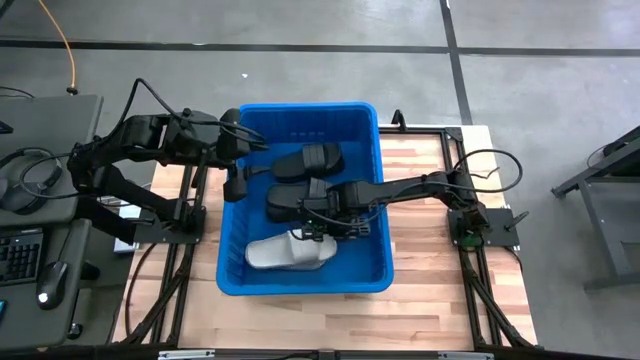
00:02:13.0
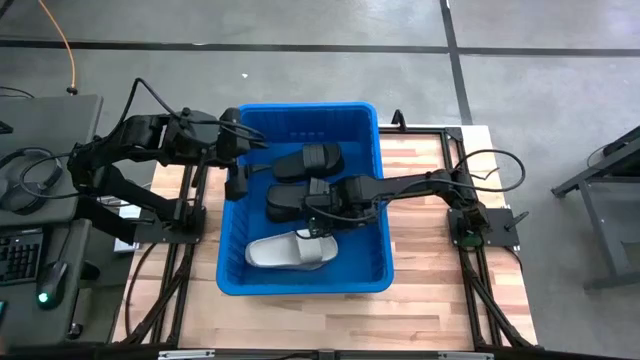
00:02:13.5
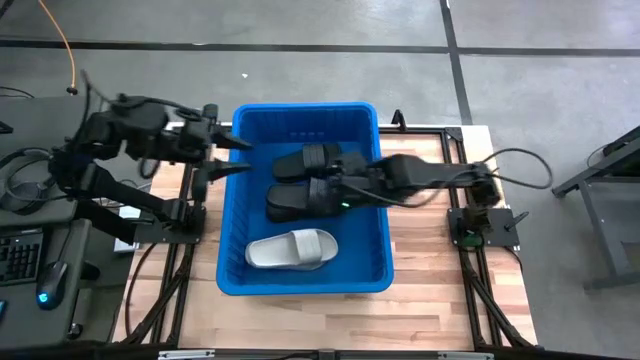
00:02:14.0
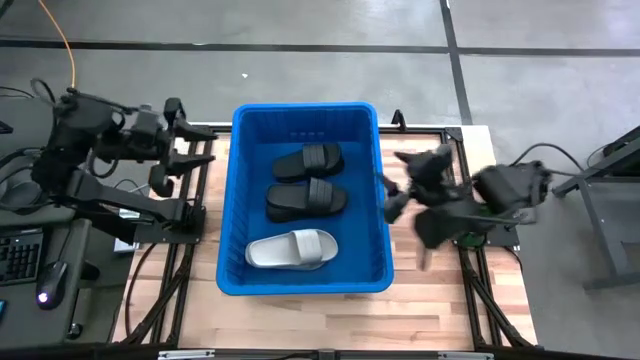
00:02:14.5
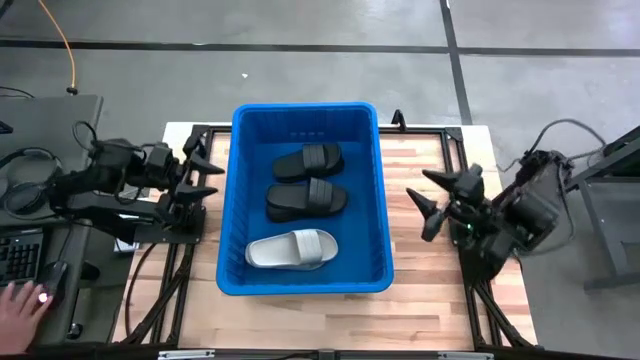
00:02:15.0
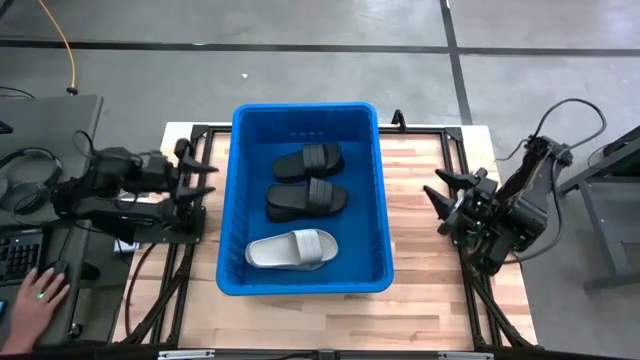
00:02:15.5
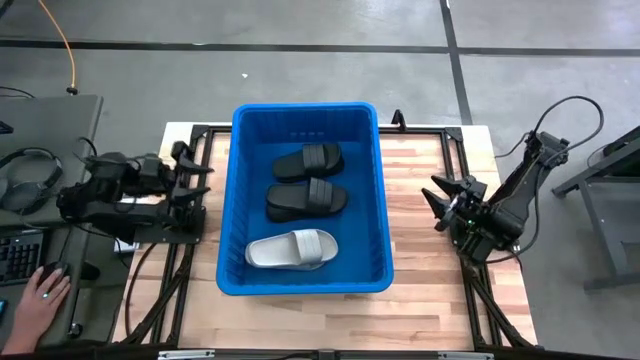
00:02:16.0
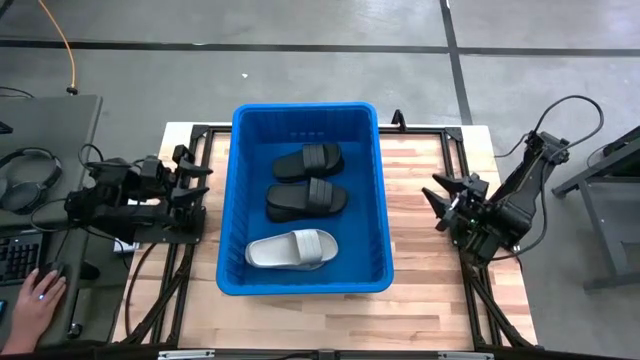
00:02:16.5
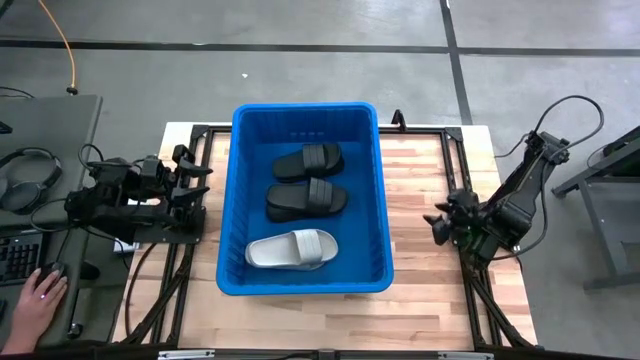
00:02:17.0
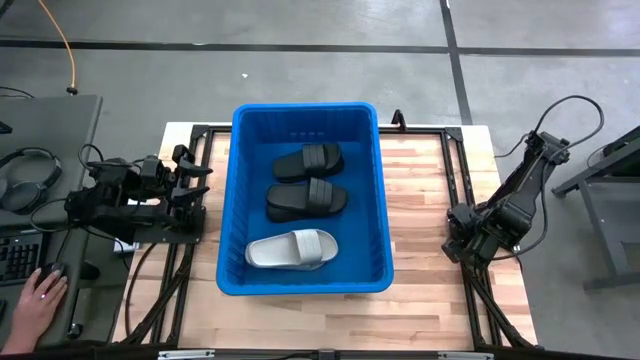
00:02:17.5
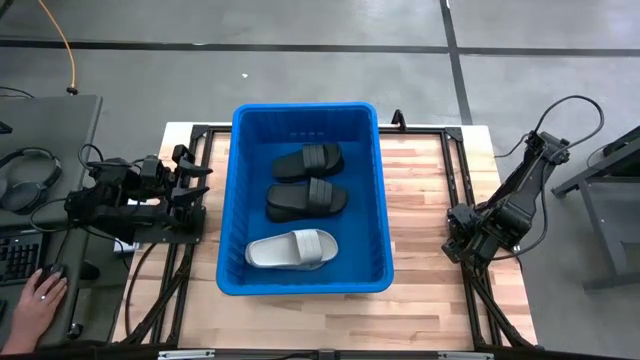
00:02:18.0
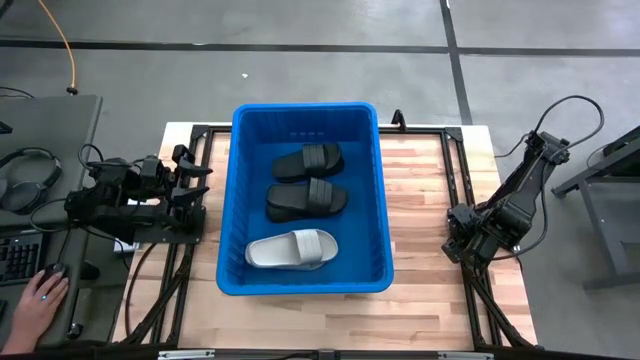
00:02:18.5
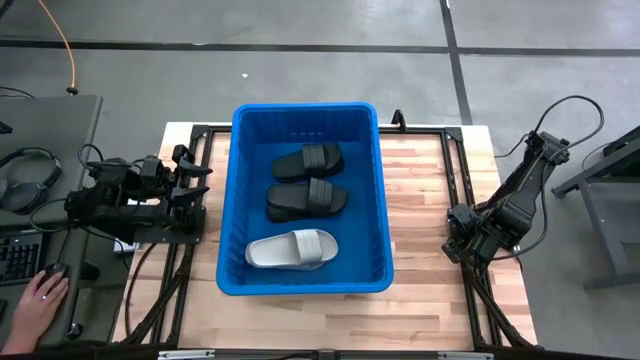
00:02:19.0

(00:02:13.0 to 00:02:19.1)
Task: Pick and place slides into bin
Return to Home Position

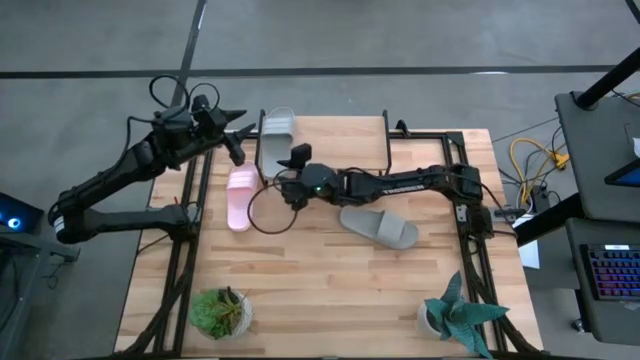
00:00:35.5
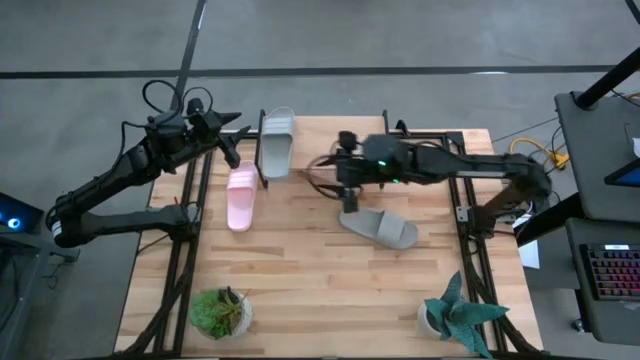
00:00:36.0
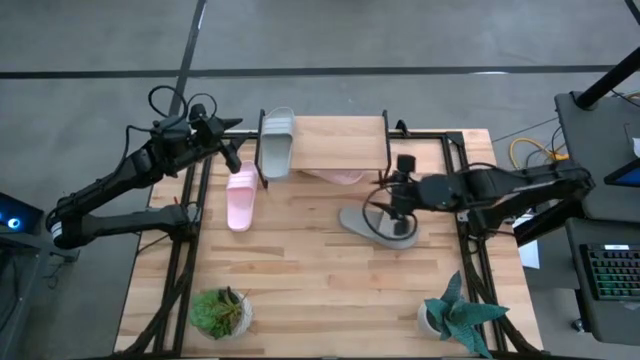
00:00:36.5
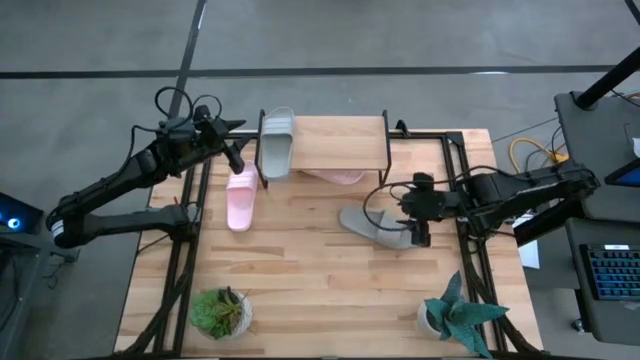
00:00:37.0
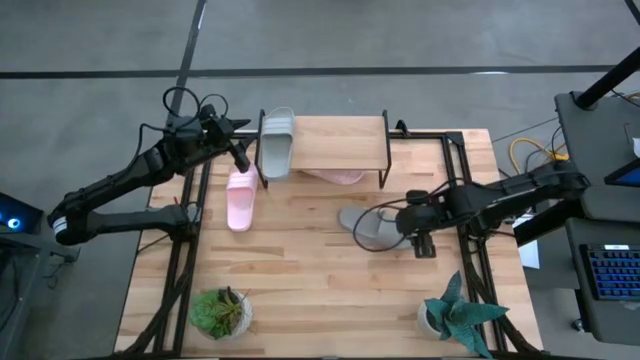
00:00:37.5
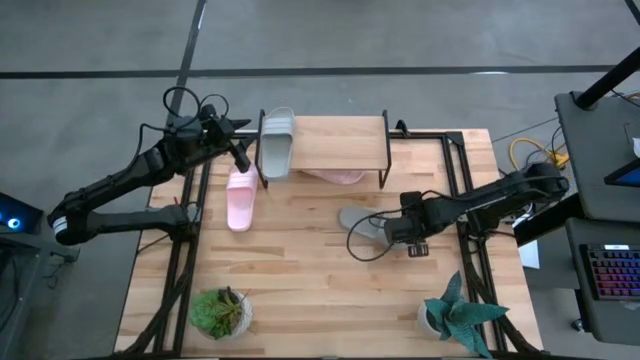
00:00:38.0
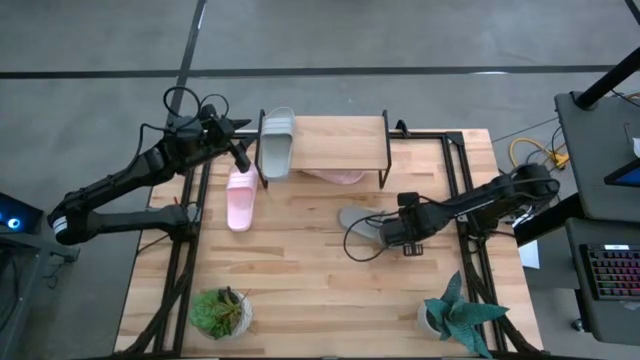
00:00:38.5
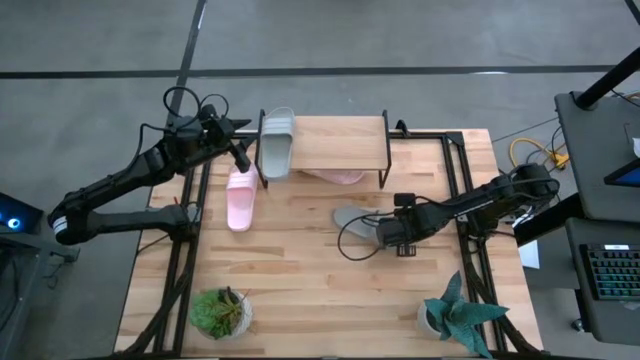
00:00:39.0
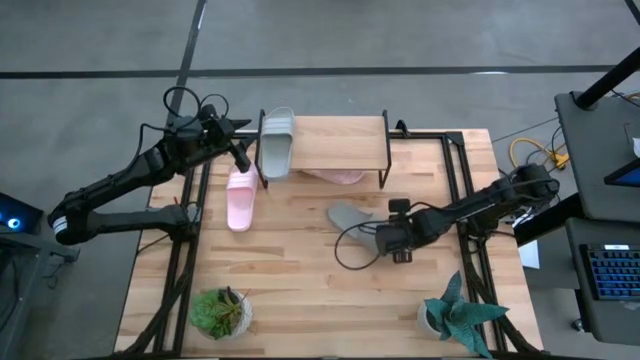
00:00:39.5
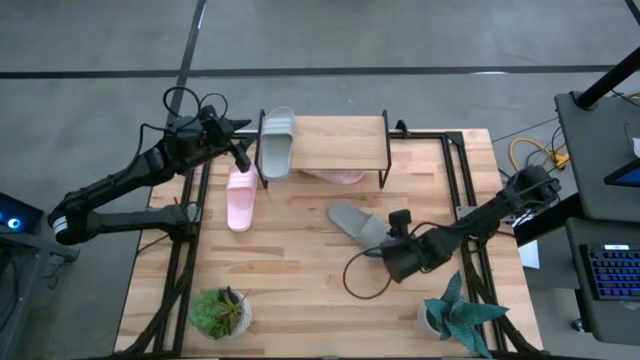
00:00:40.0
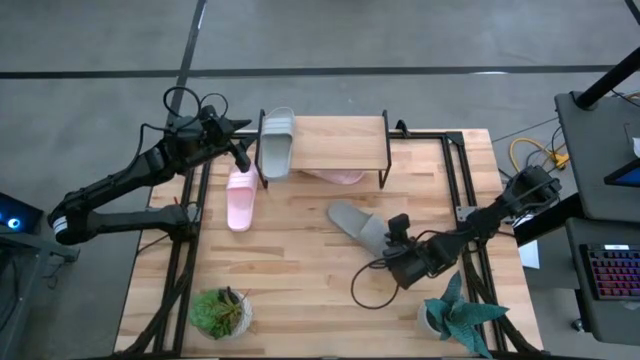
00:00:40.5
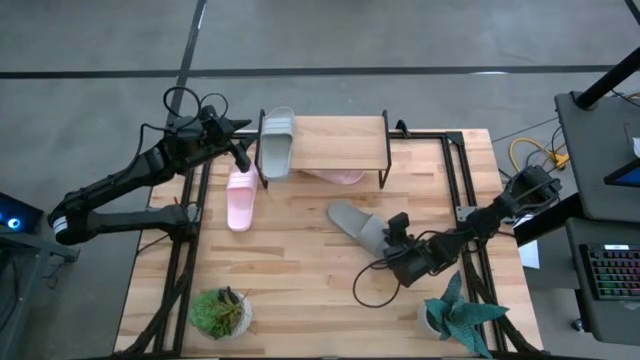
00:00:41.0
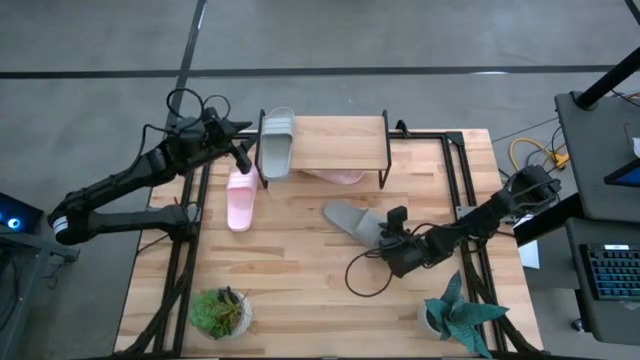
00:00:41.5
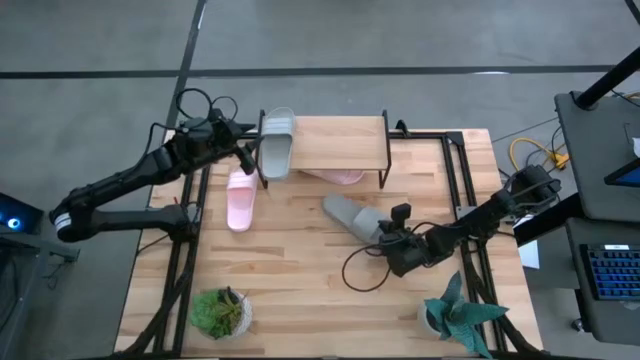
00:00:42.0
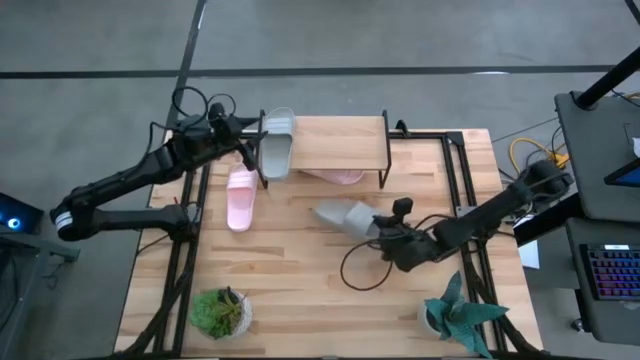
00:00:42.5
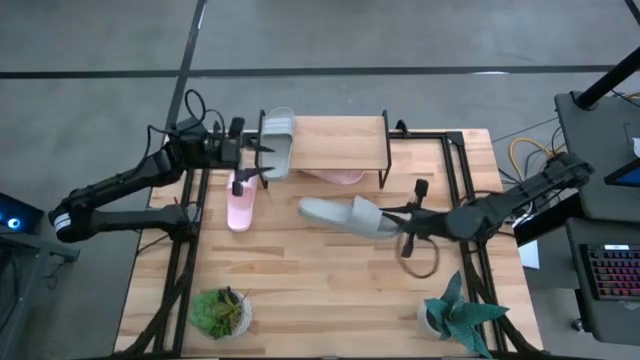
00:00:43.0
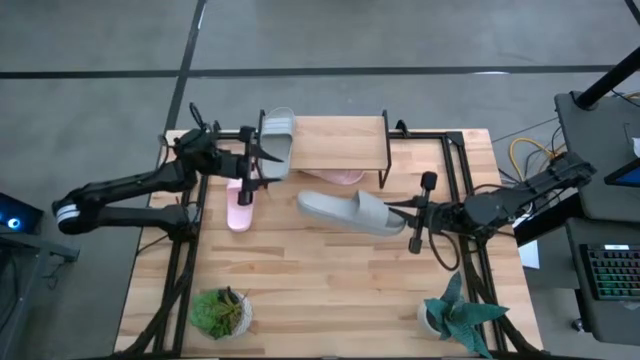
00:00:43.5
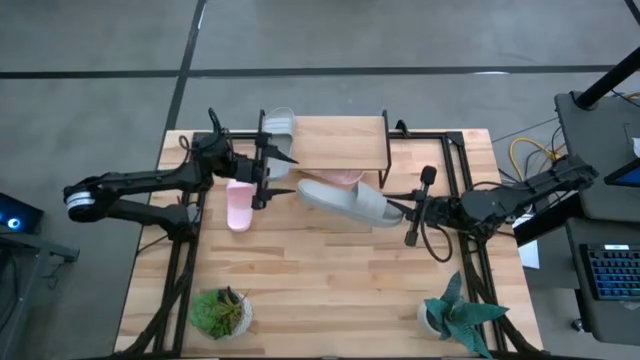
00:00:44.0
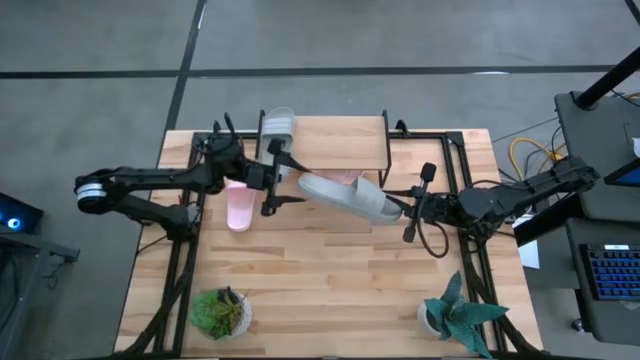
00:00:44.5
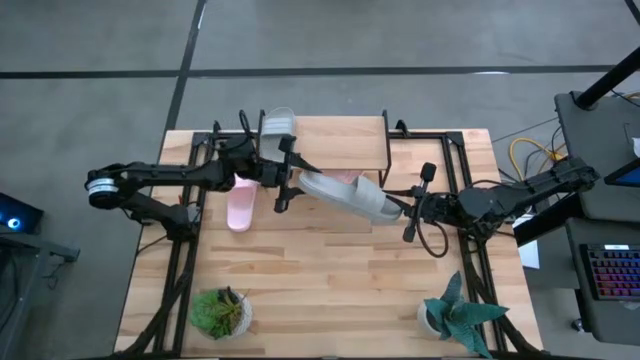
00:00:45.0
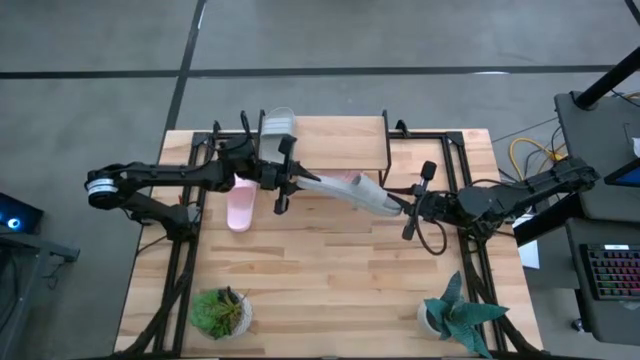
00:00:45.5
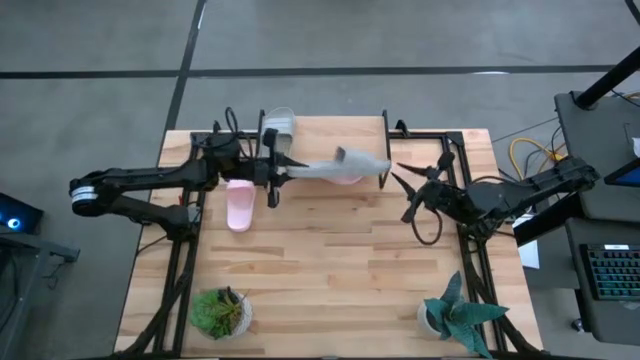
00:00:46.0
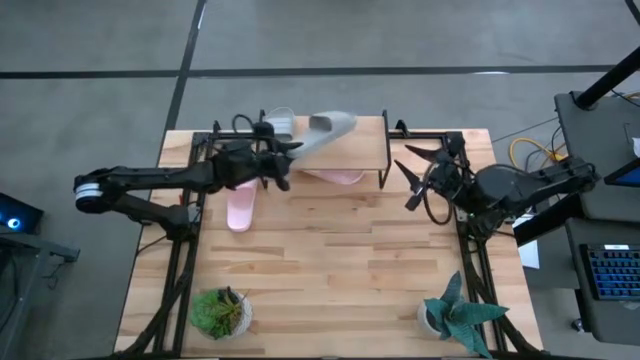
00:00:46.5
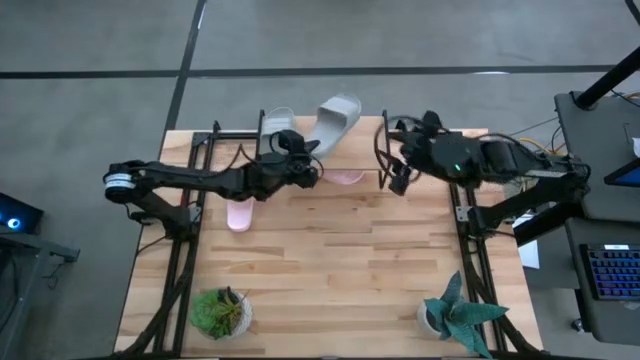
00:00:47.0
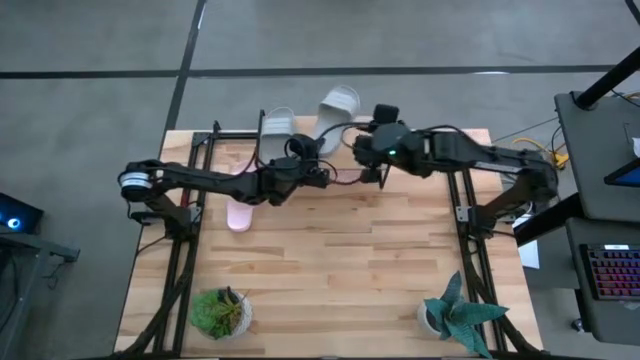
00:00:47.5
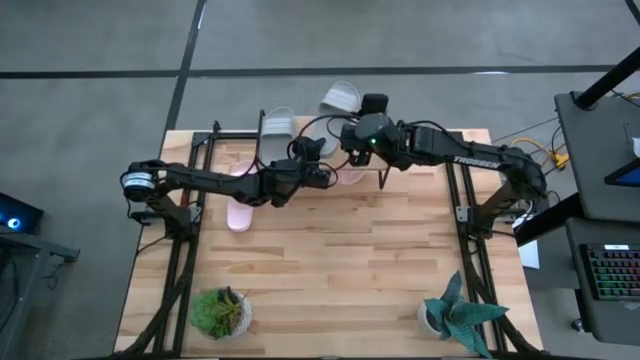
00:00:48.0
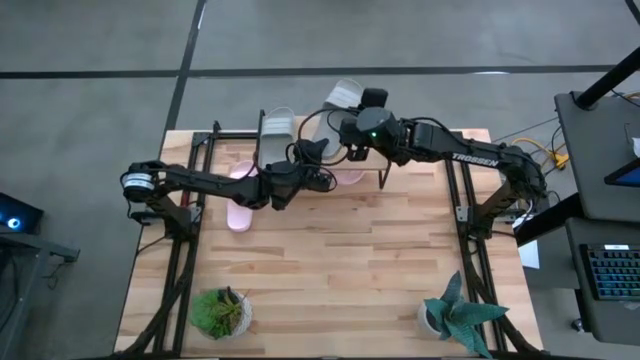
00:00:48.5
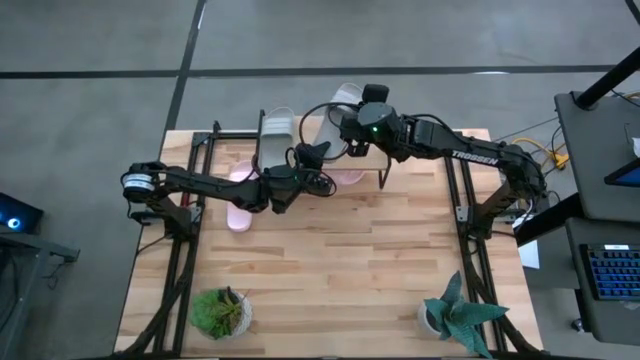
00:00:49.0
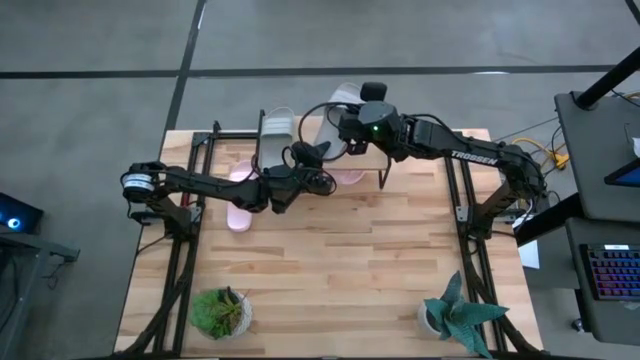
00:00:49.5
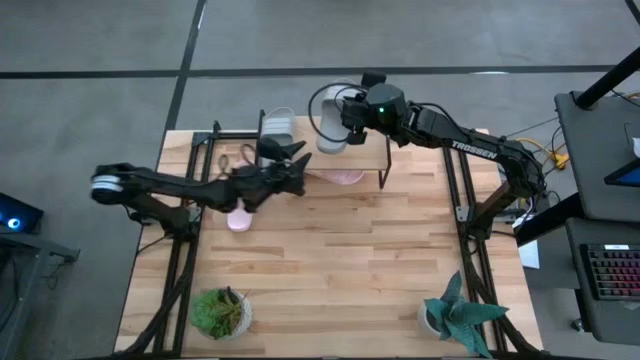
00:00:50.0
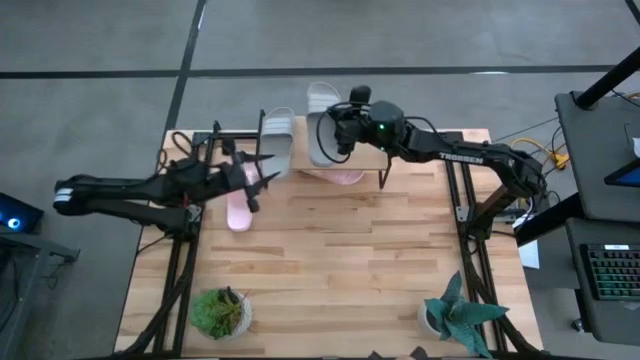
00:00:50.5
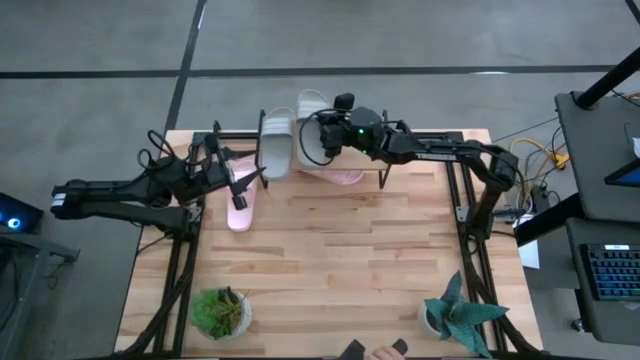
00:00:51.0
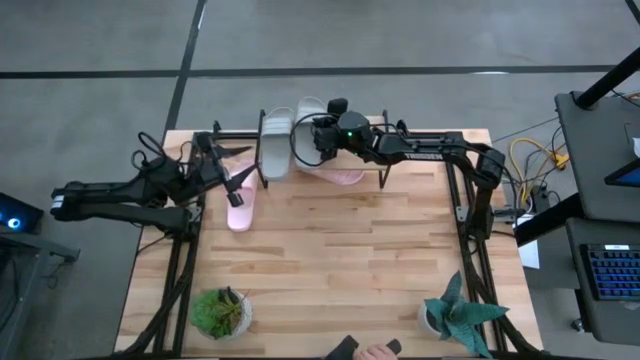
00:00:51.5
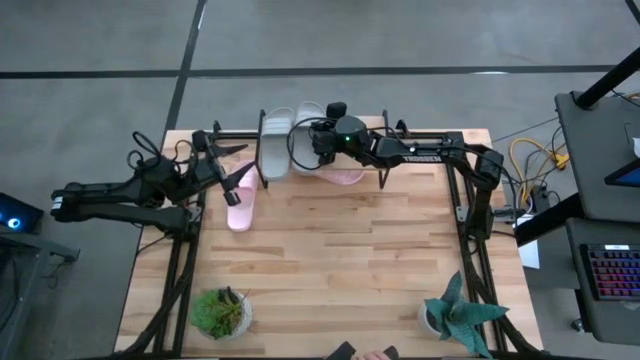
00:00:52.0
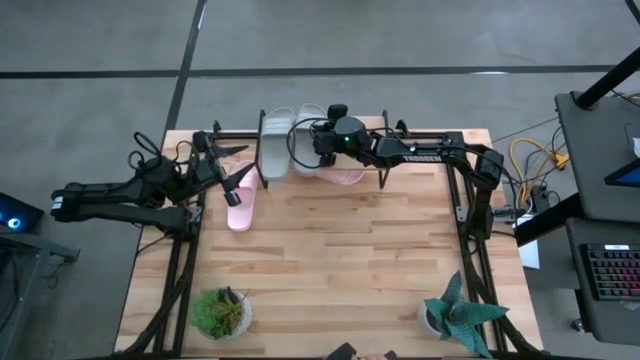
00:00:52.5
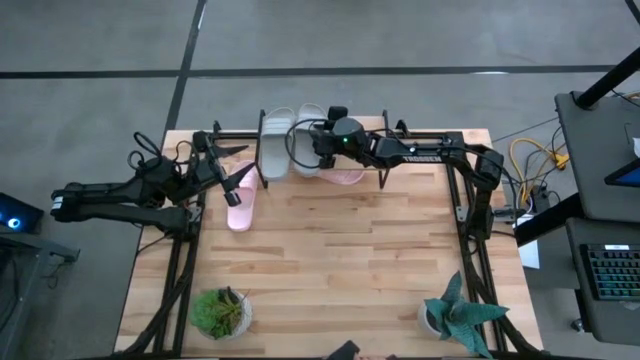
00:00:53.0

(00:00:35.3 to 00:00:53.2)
Task: Pick and place slides into the shelf
Put the gray slipper on the shelf
